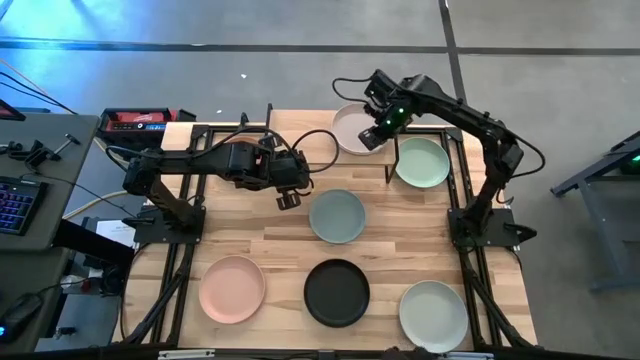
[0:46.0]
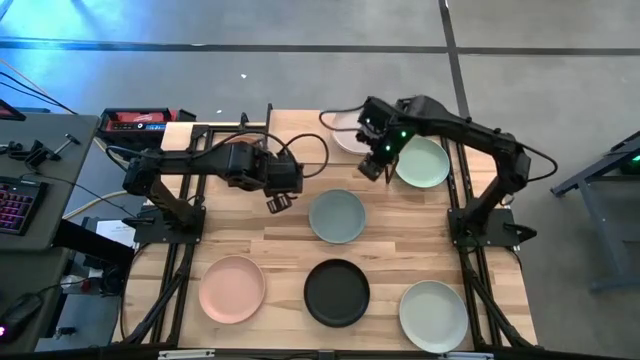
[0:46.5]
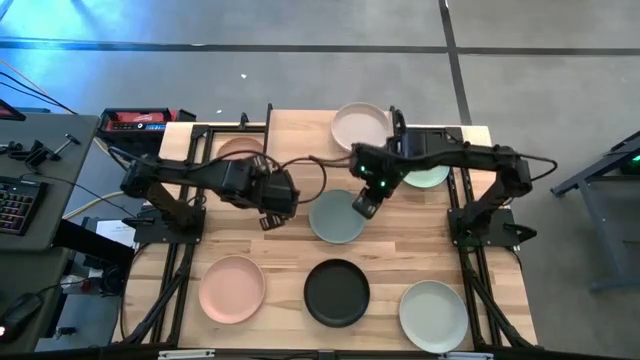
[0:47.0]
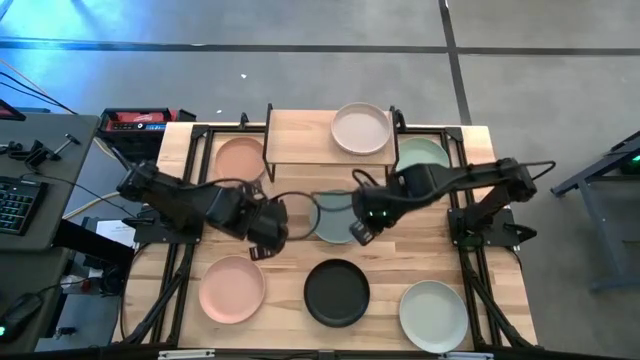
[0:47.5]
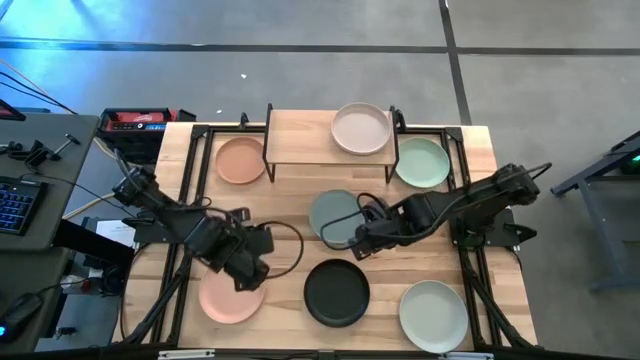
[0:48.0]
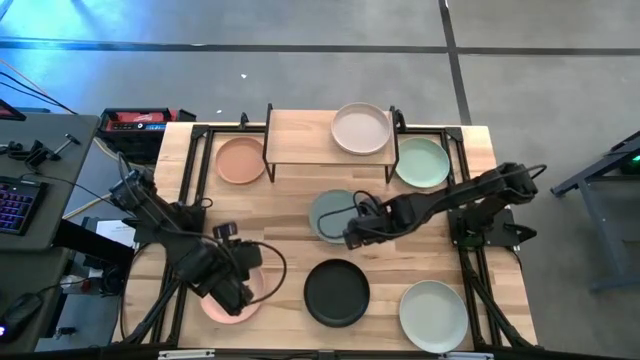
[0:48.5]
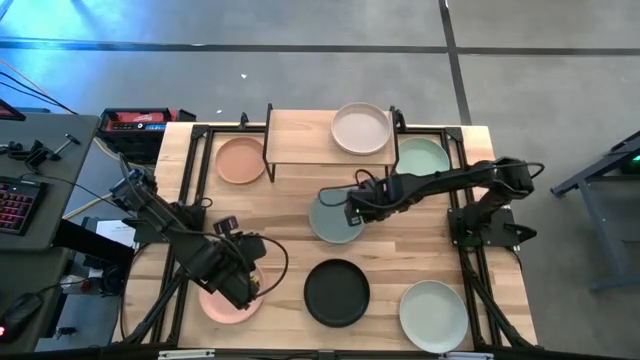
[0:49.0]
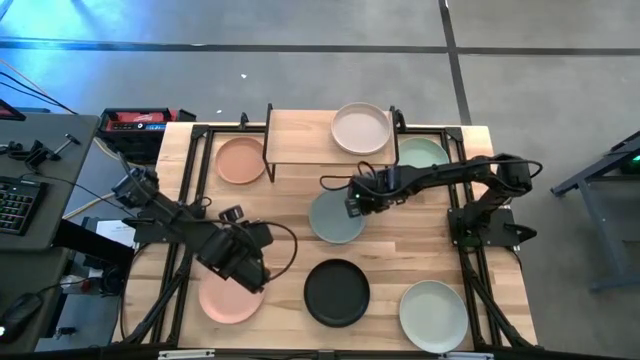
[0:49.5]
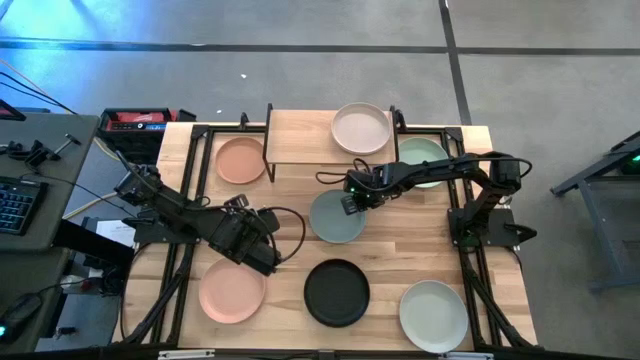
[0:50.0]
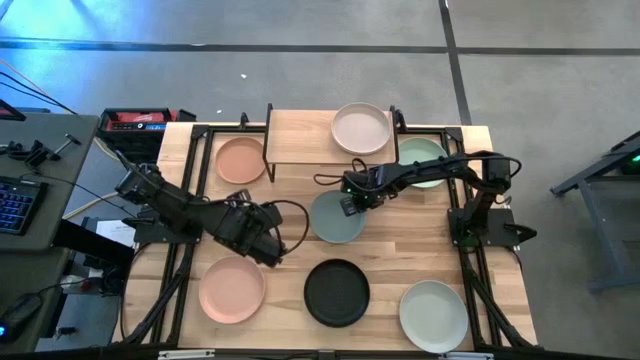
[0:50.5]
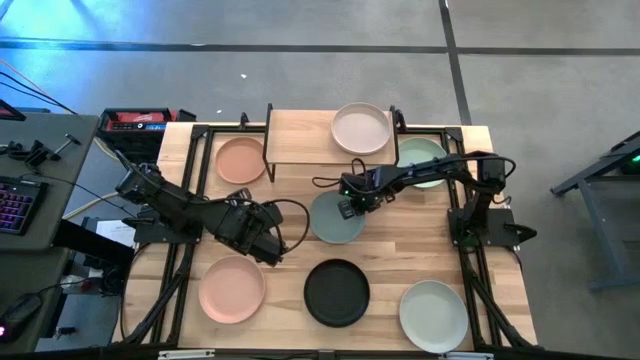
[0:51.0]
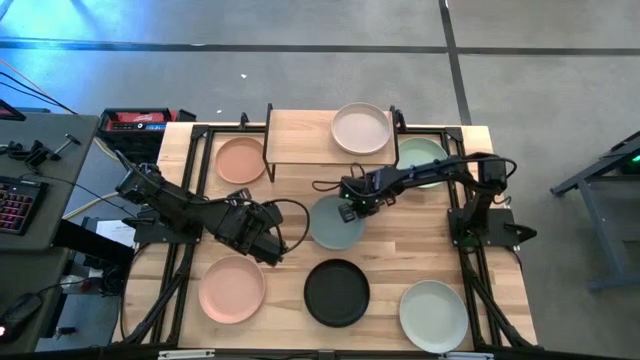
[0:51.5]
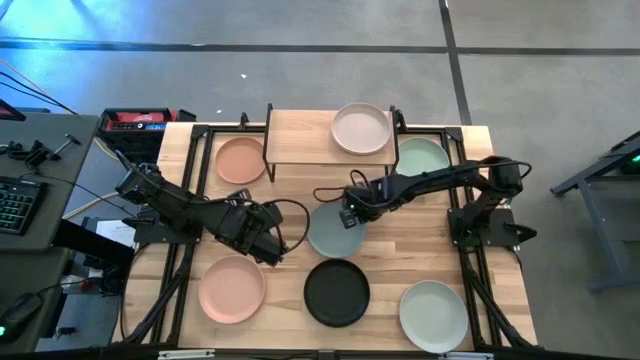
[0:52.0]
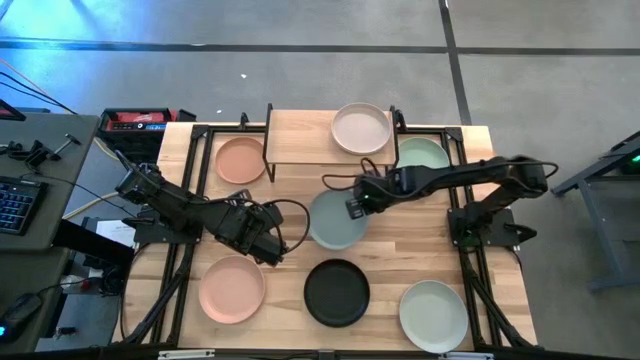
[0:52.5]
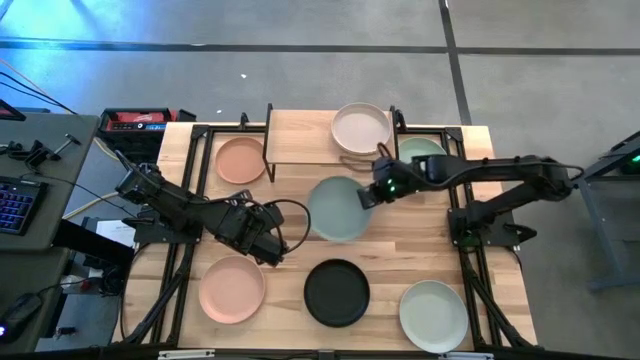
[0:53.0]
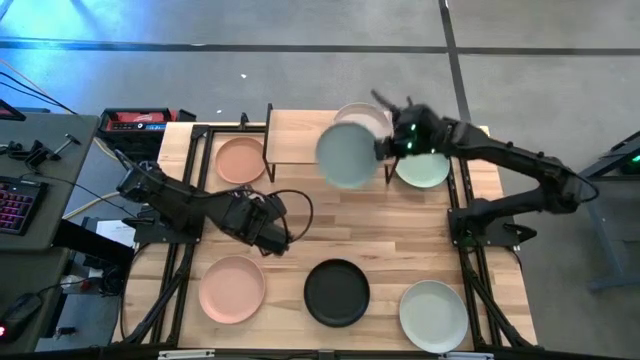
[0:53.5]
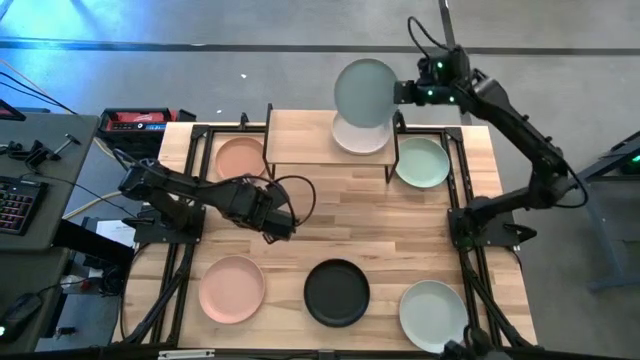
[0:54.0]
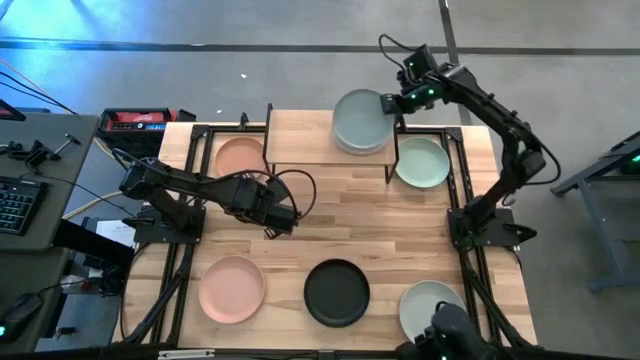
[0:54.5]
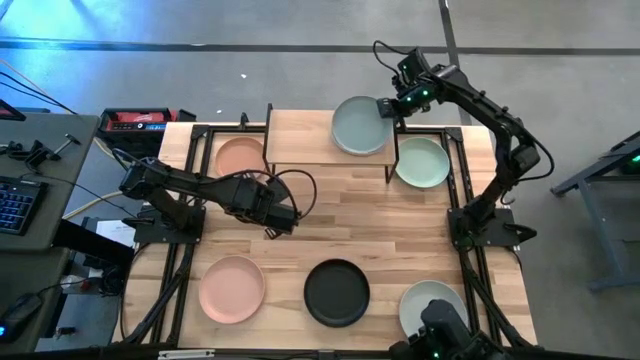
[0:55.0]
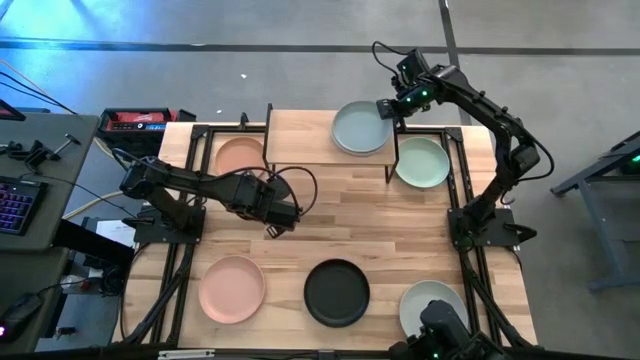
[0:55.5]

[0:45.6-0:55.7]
Task: Place and stack plates onto a shelf
Stack the blue plate on the top of the other light brown plate on the shelf

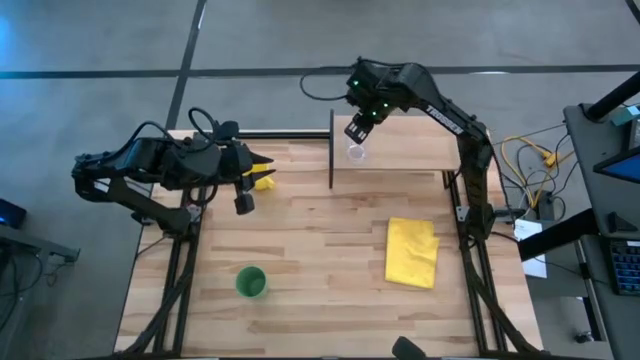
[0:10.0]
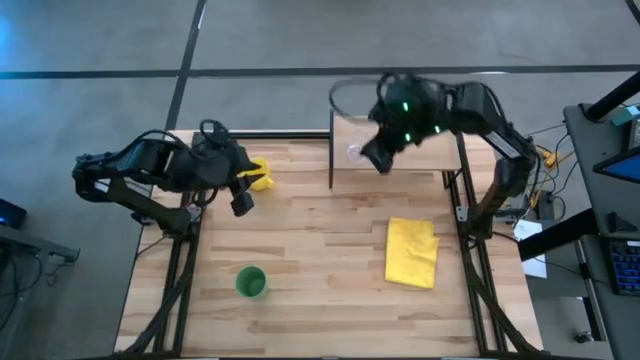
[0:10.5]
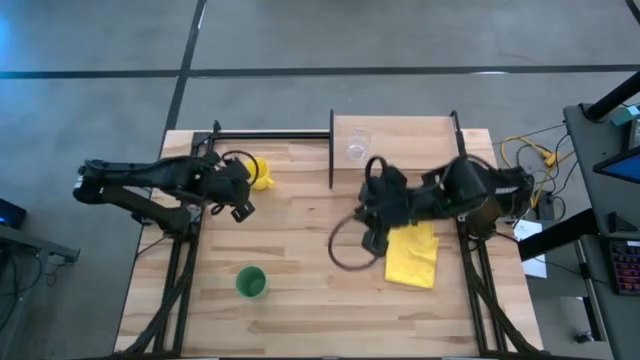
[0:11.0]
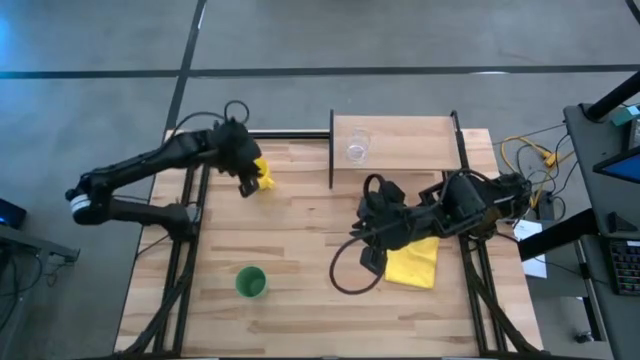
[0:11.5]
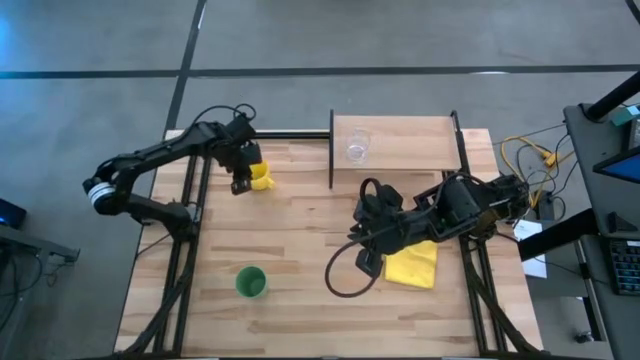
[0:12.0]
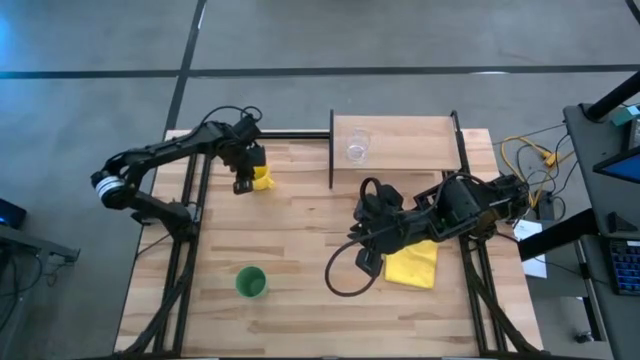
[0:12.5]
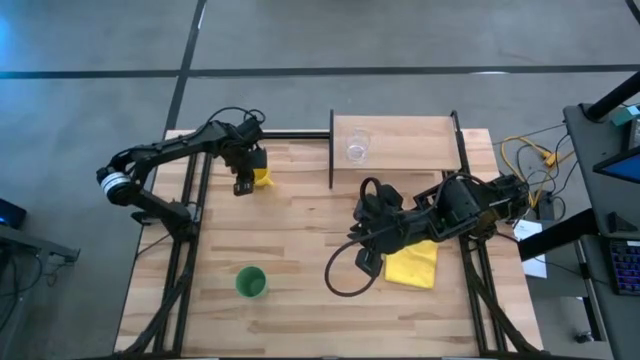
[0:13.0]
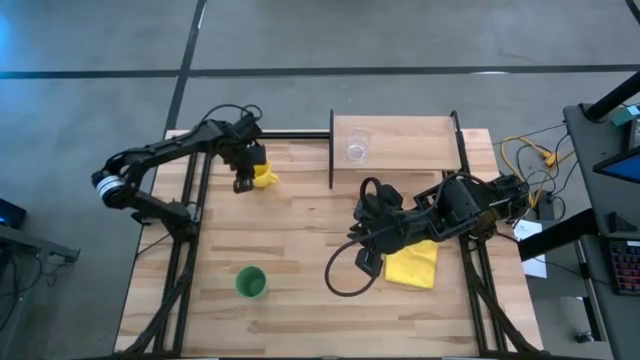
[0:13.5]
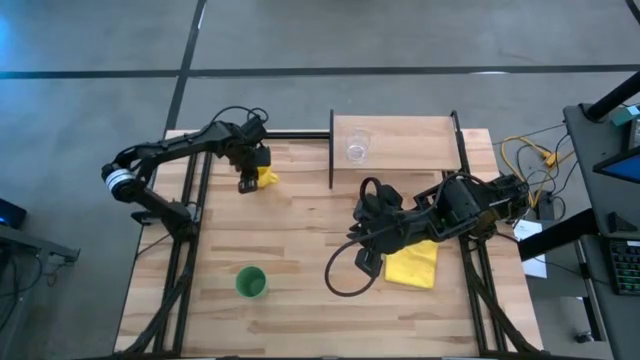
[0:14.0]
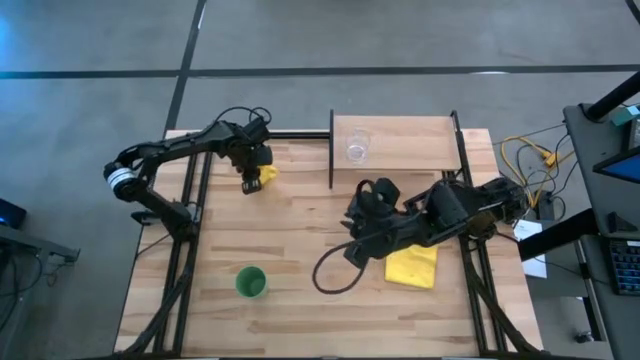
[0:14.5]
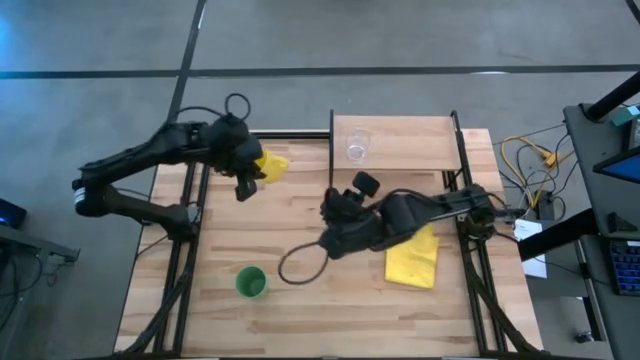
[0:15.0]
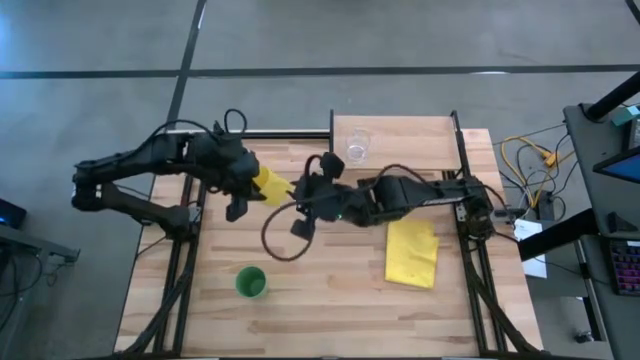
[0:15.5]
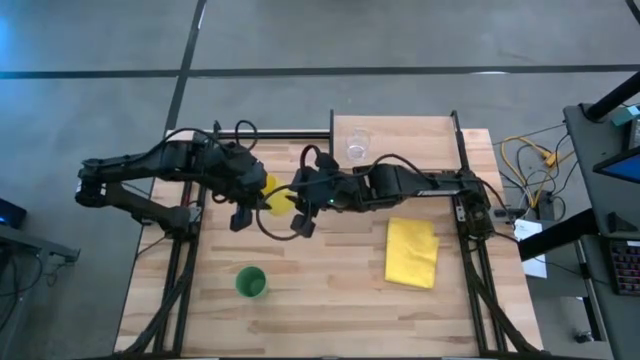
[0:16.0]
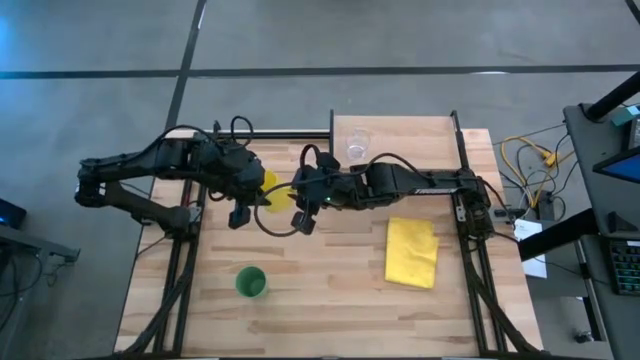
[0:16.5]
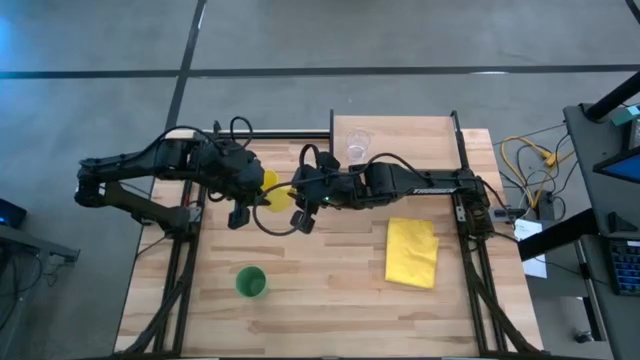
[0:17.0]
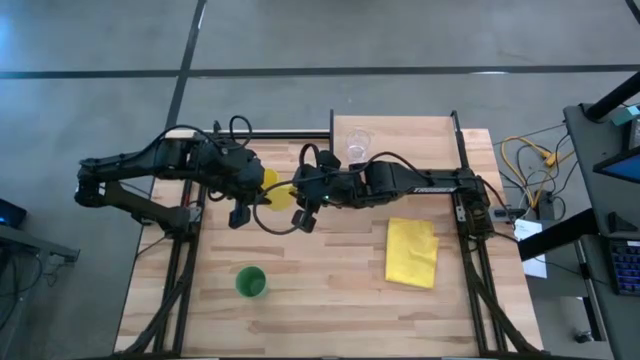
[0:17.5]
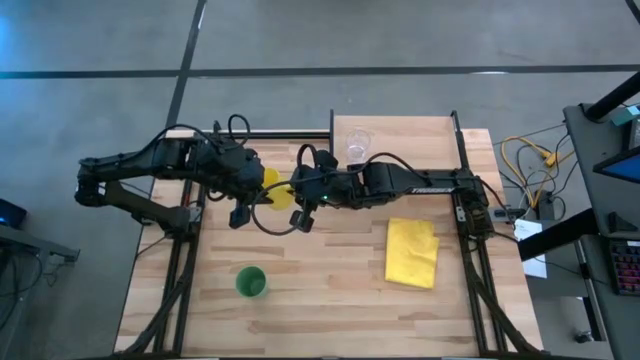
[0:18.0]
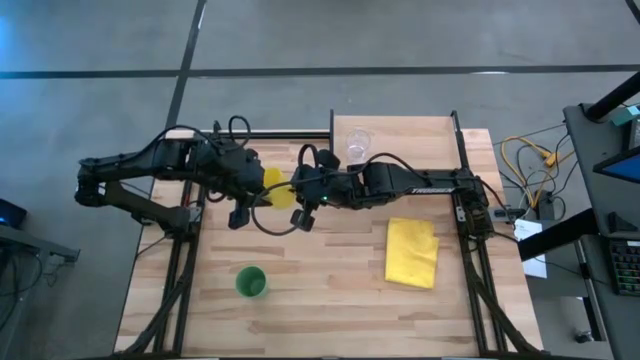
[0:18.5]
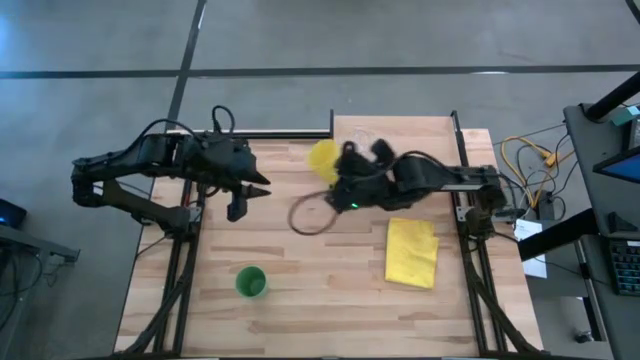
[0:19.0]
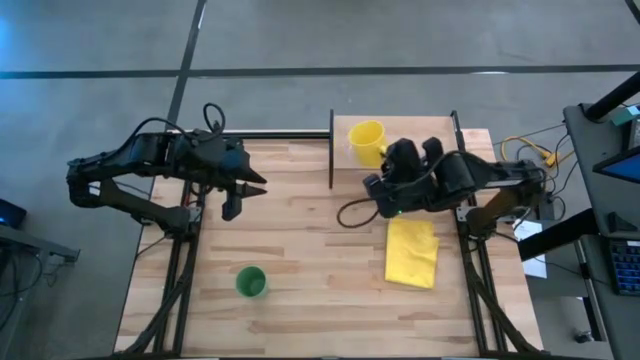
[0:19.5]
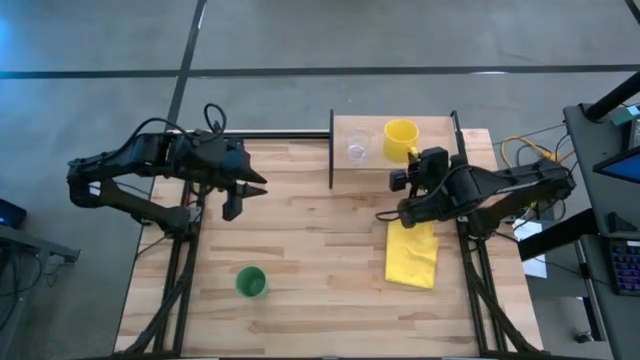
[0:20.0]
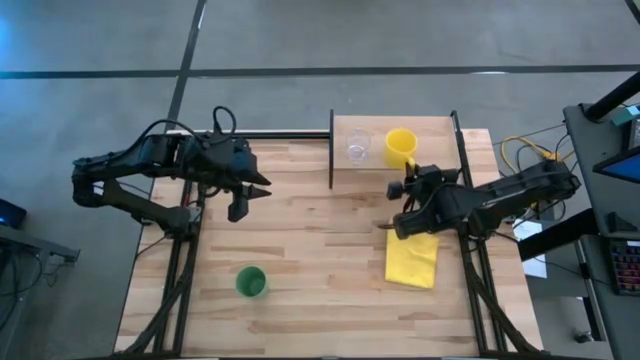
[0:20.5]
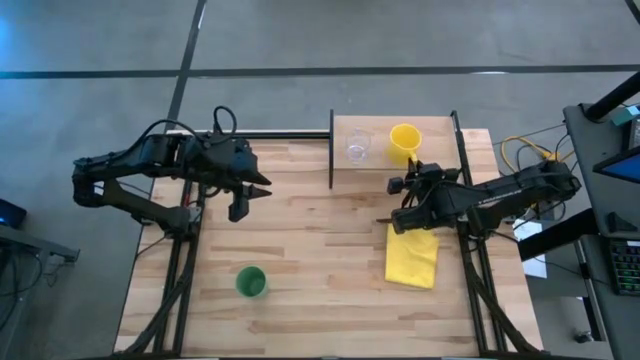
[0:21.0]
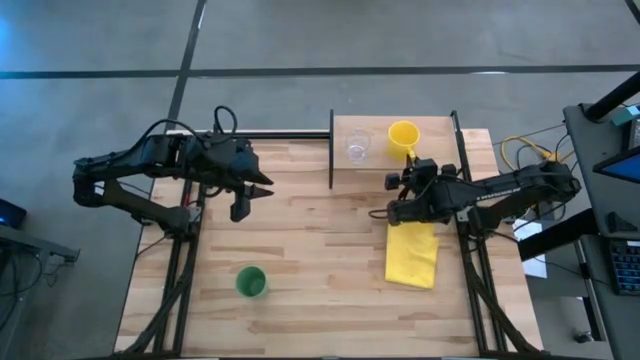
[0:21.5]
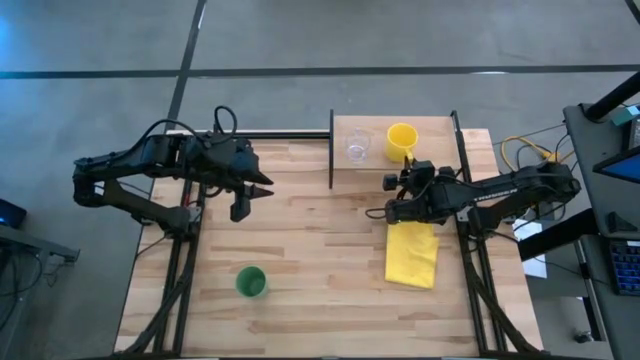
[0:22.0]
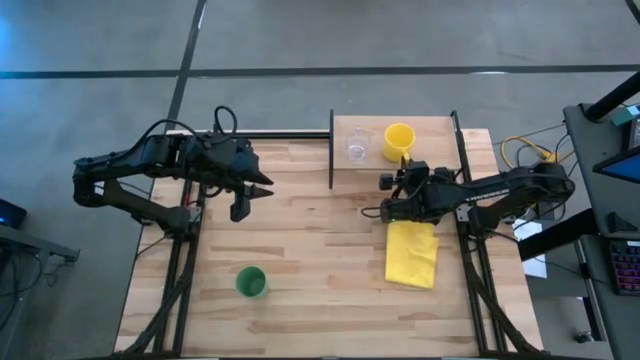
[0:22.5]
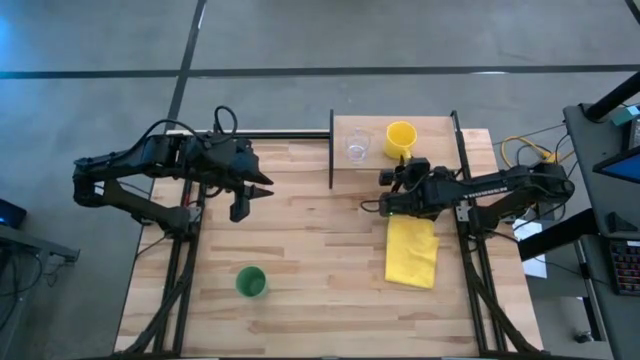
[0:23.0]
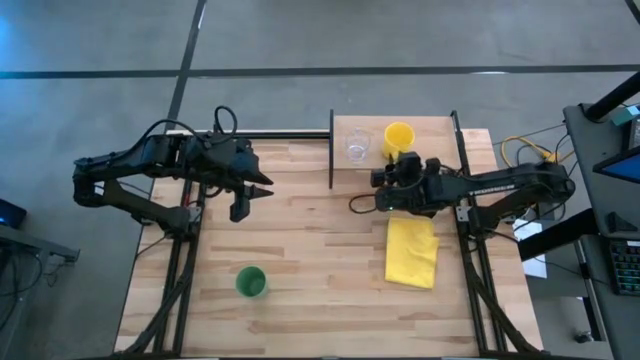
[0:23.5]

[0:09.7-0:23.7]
Task: Stack small to large cups/mugs on shelf
Put the yellow mug on the shelf
